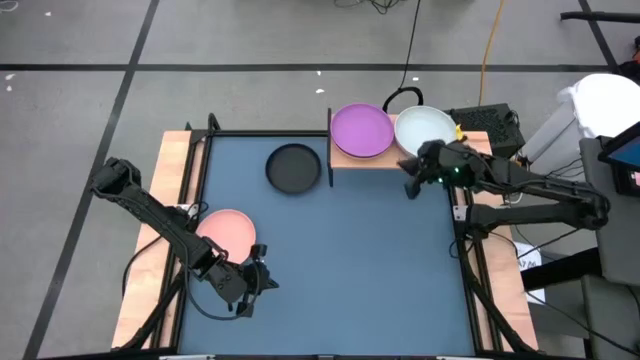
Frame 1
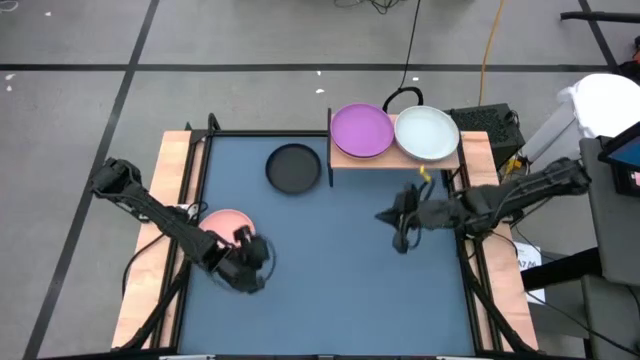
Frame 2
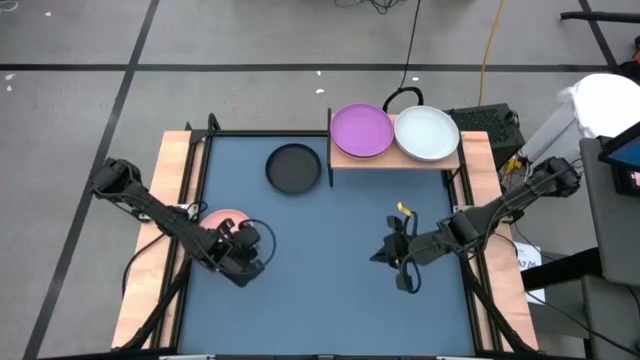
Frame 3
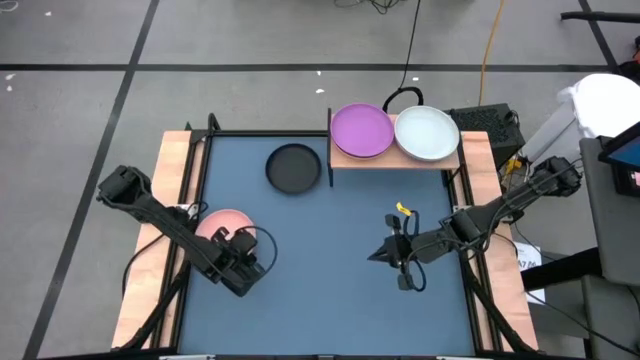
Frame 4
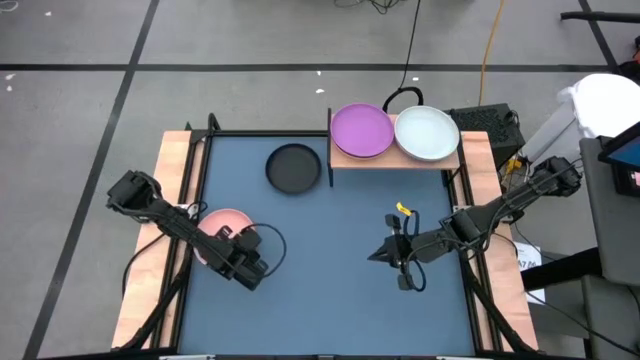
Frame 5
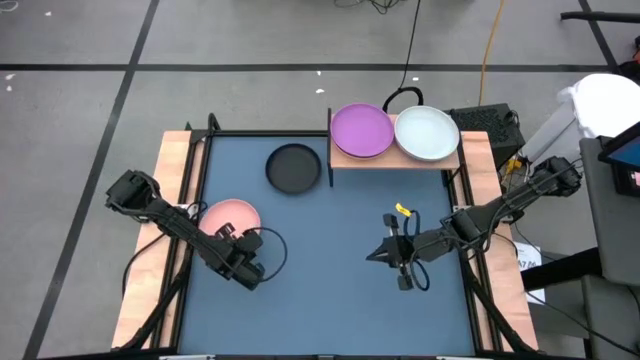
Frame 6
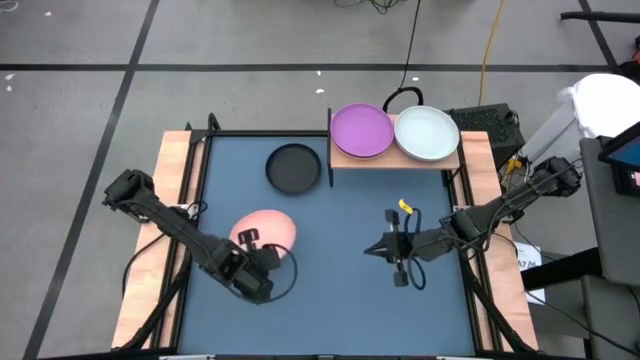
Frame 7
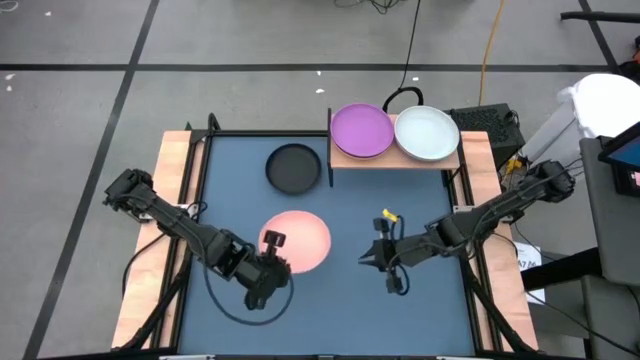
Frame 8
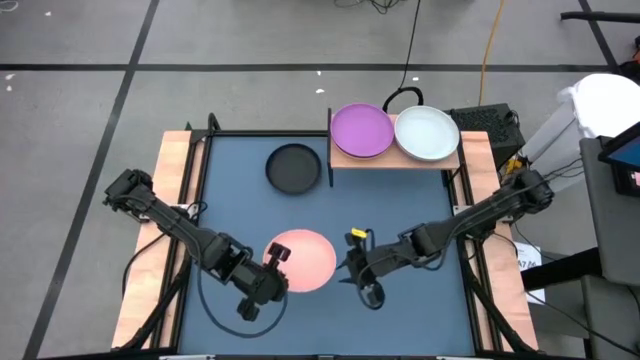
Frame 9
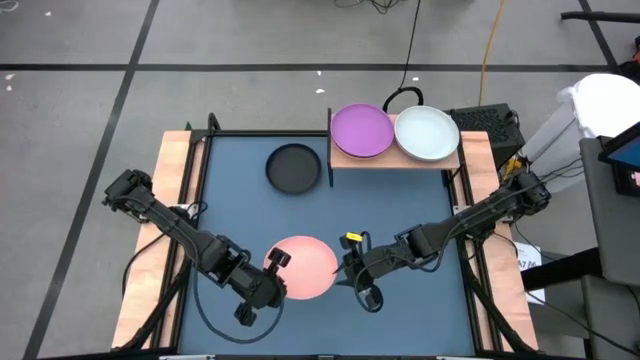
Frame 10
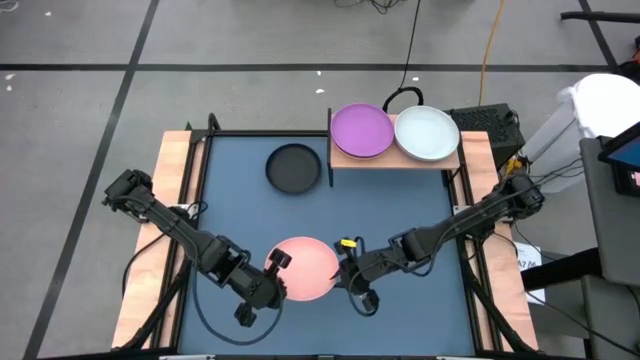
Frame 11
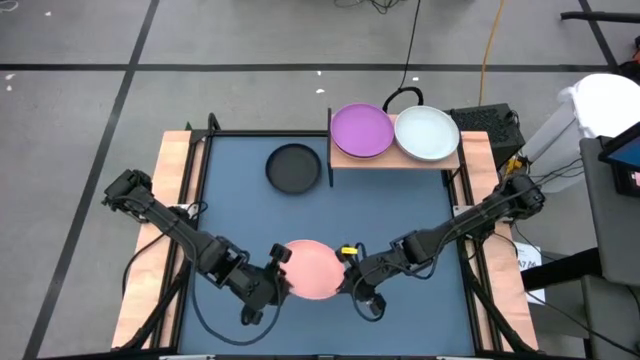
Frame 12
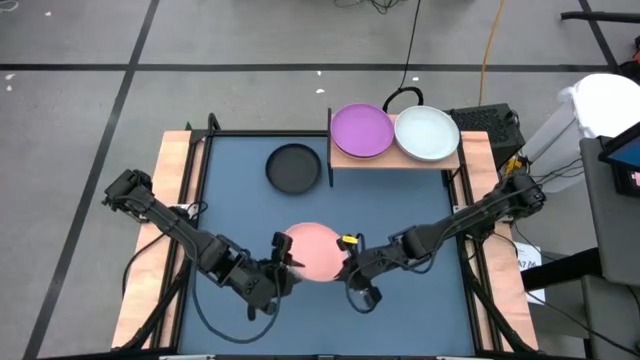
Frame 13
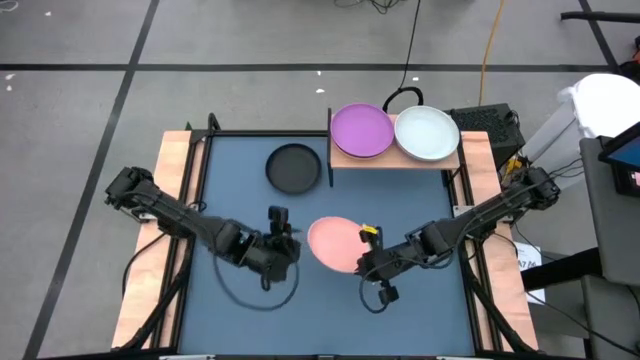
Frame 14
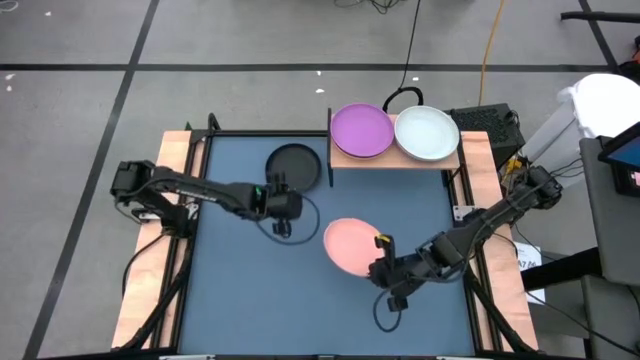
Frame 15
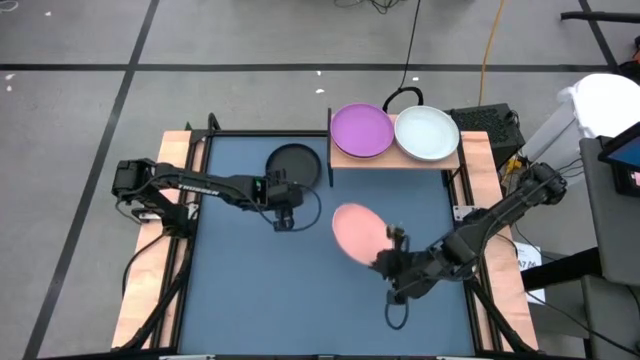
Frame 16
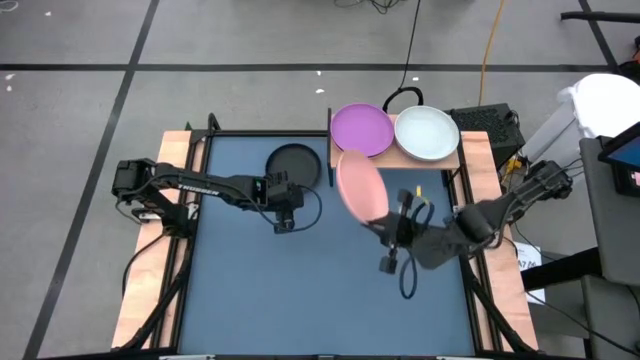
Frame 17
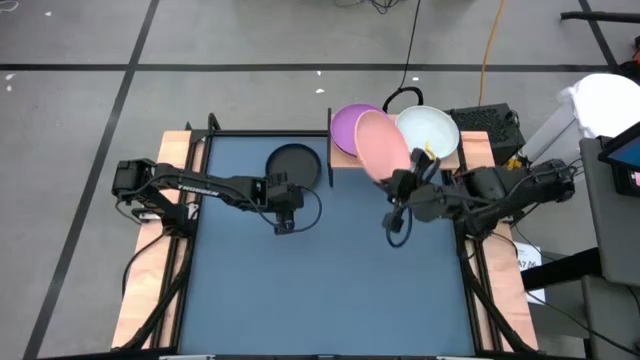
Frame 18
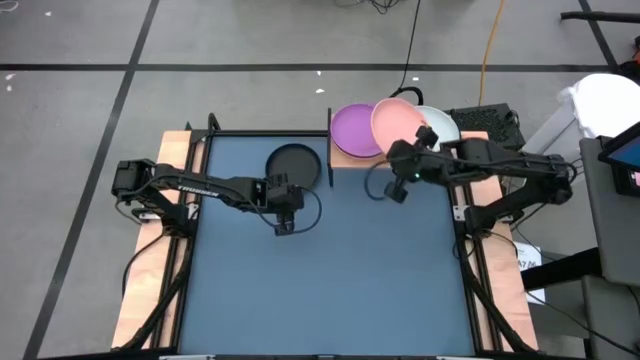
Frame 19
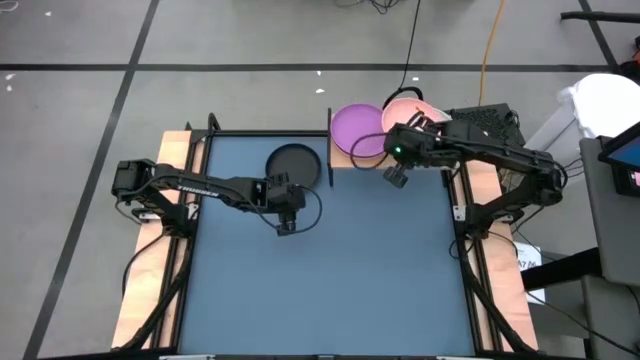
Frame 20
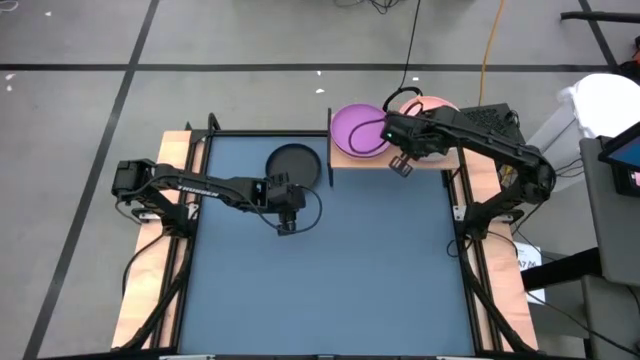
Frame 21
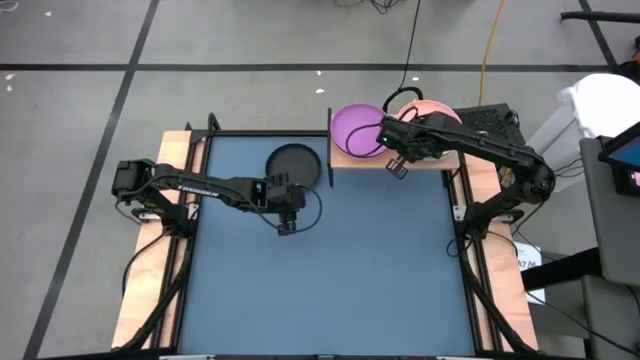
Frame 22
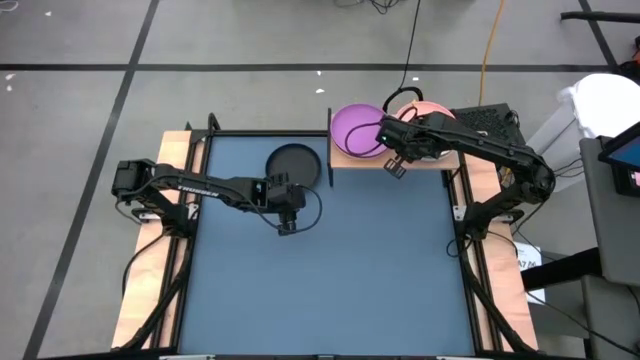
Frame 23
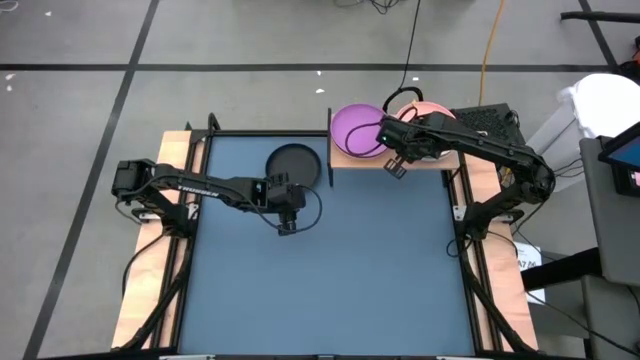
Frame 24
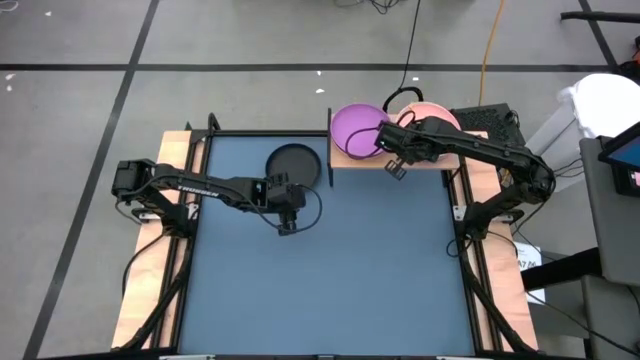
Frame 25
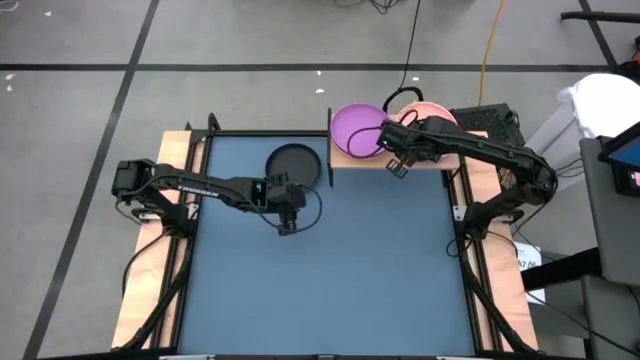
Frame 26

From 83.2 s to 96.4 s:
Task: Place and stack plates onto a shelf
Stack the pink plate on top of the gray plate on the shelf

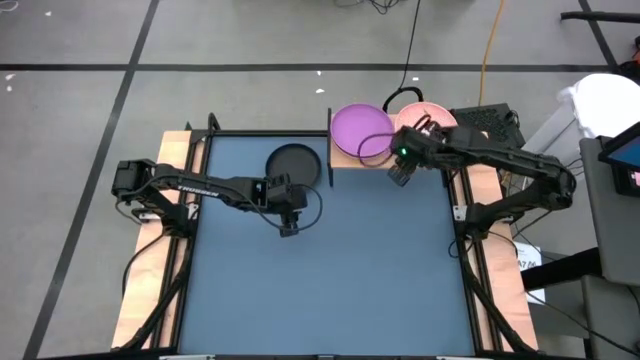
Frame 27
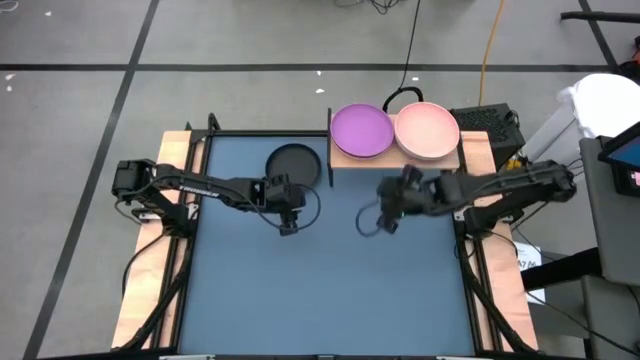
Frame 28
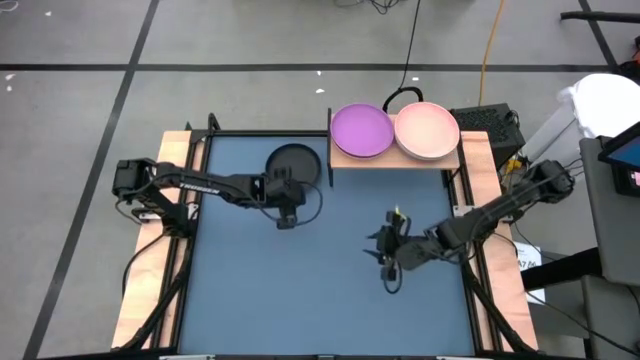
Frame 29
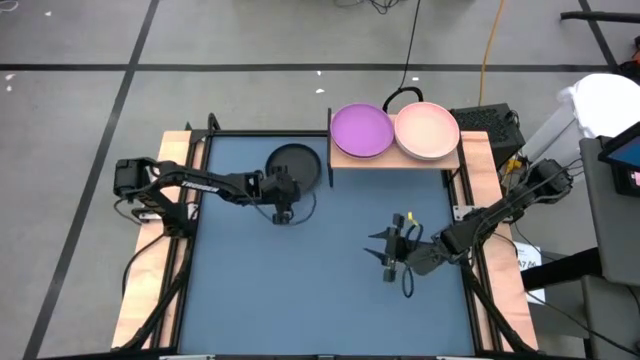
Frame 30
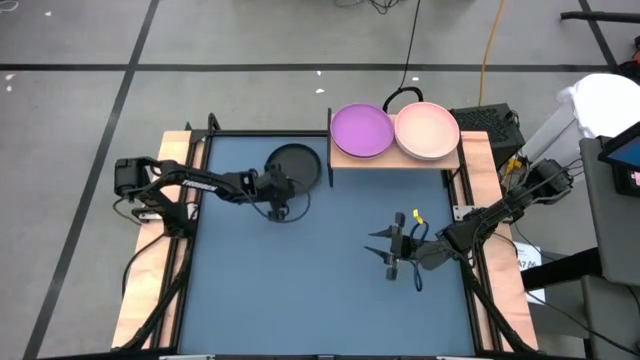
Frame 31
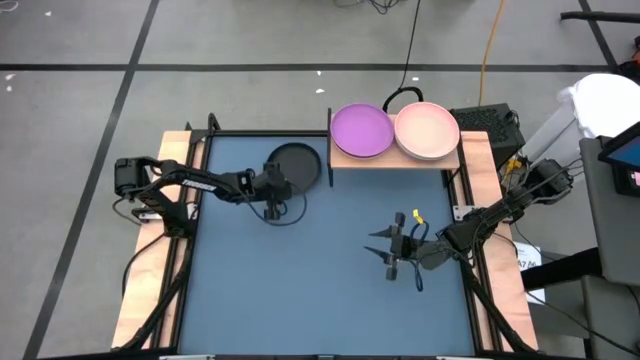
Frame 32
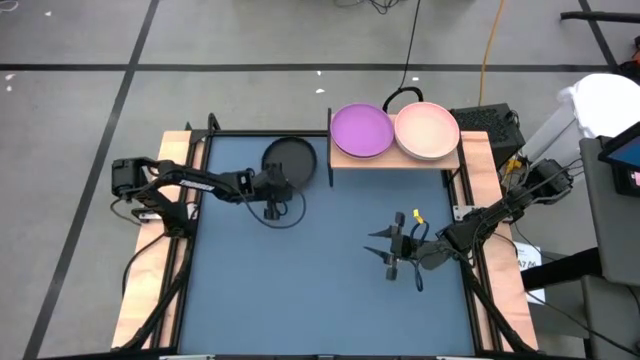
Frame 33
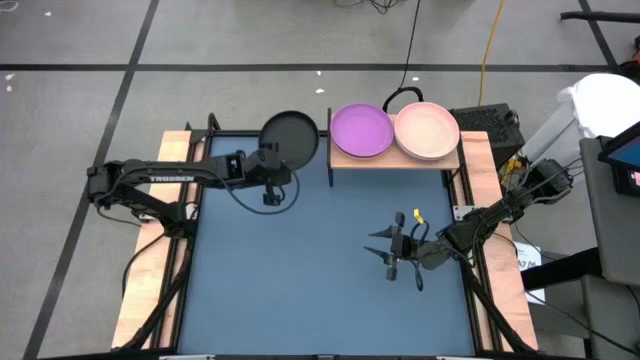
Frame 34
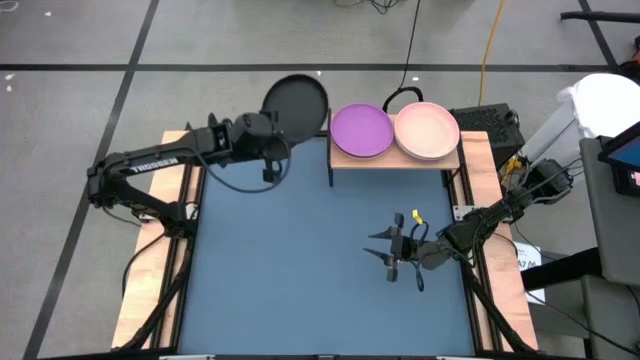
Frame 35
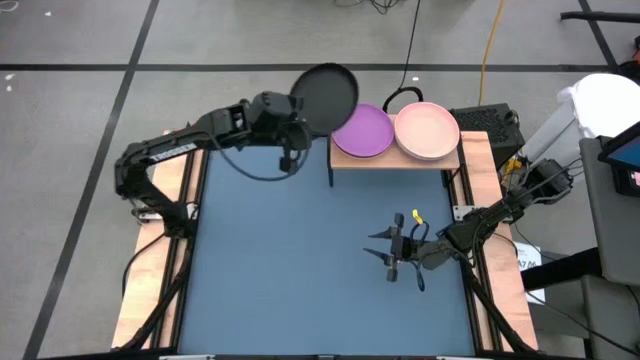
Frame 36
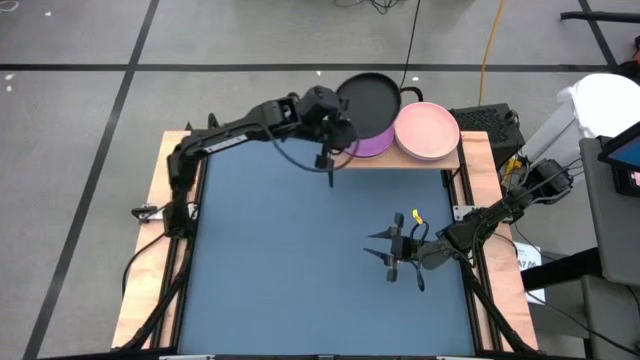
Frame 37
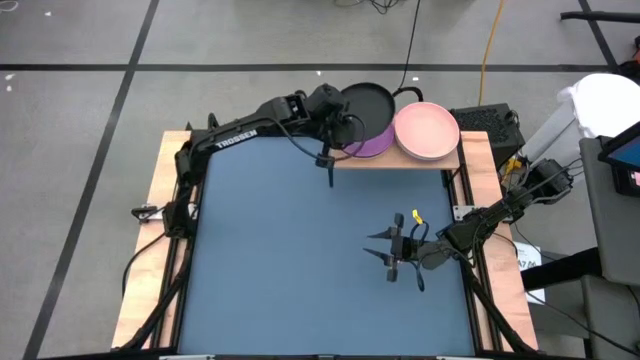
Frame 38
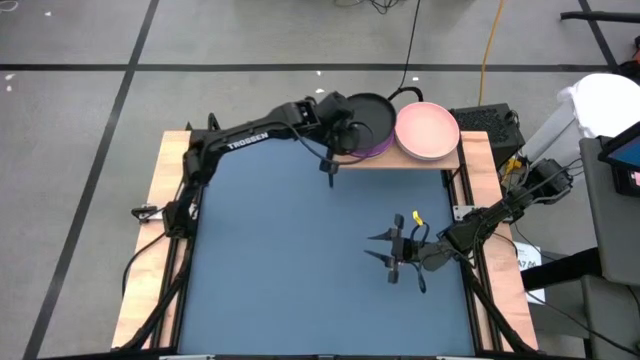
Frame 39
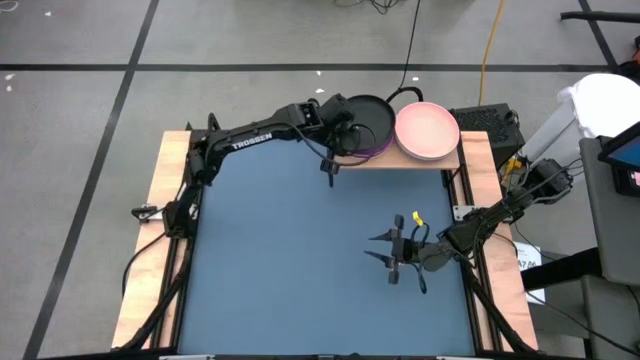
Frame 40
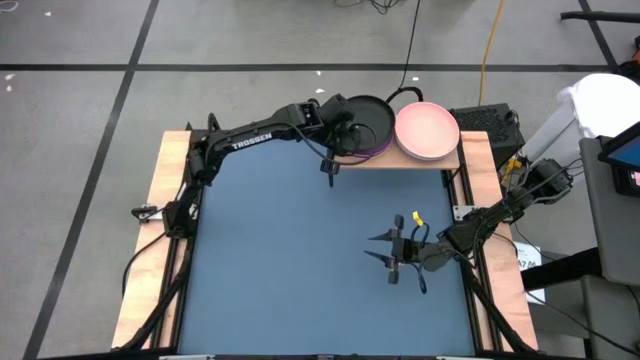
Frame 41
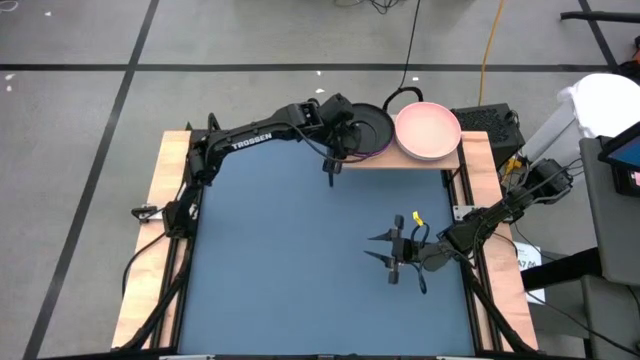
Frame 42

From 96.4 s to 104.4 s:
Stack the black plate on top of the purple plate on the shelf
